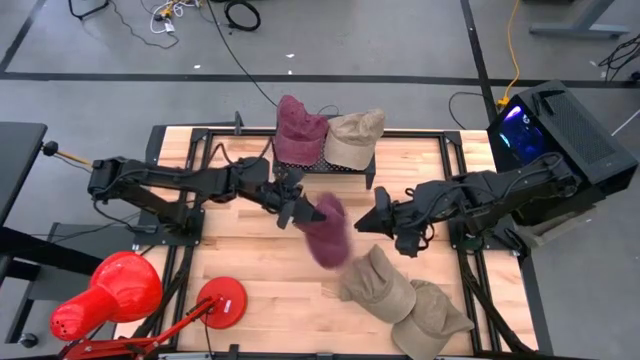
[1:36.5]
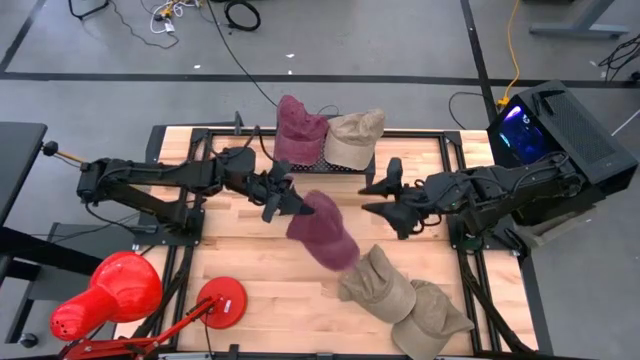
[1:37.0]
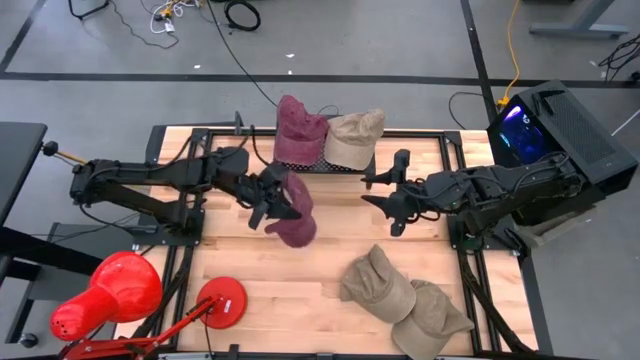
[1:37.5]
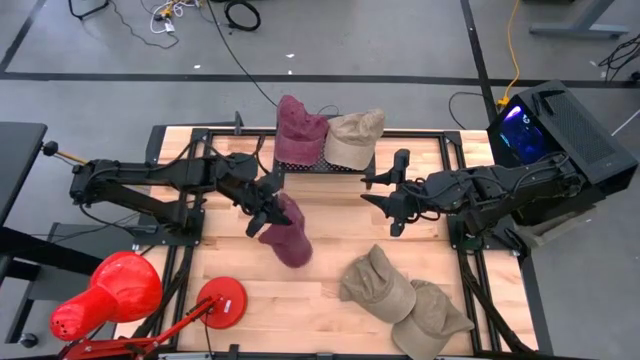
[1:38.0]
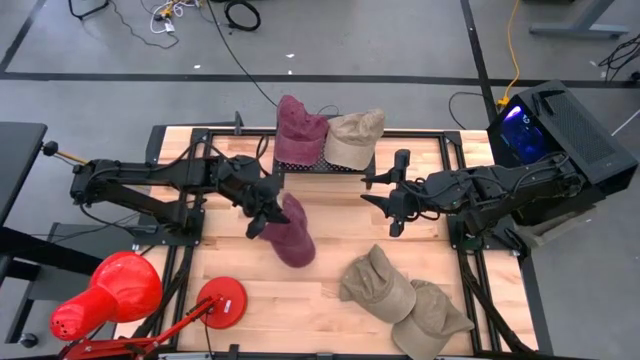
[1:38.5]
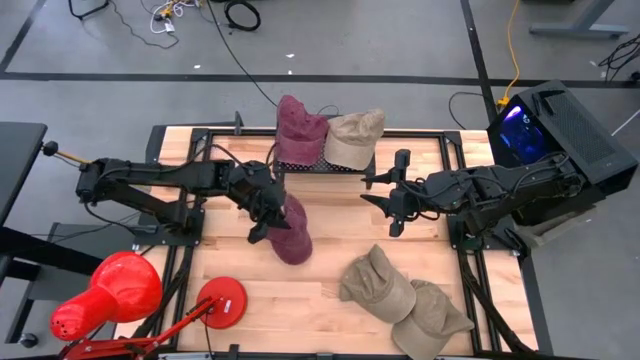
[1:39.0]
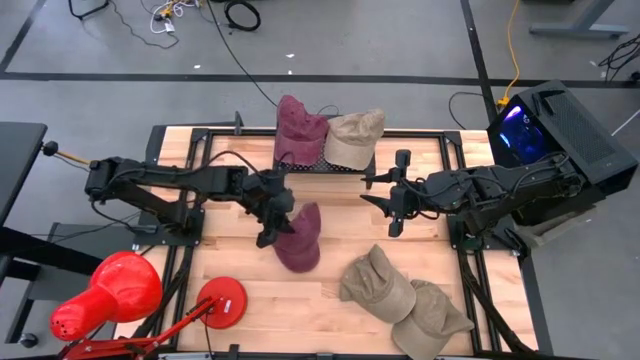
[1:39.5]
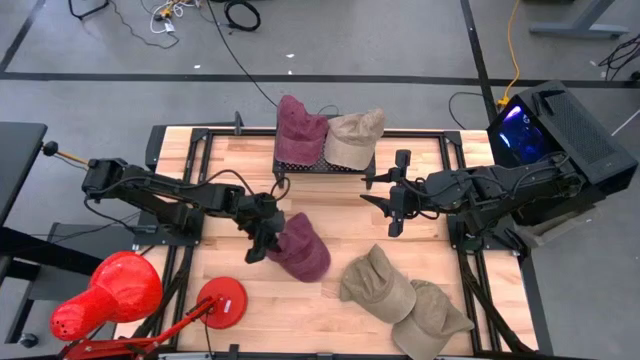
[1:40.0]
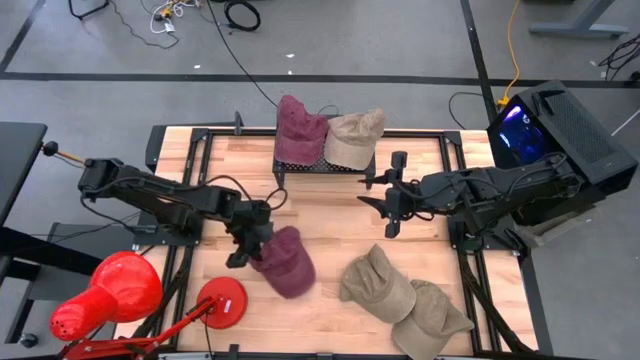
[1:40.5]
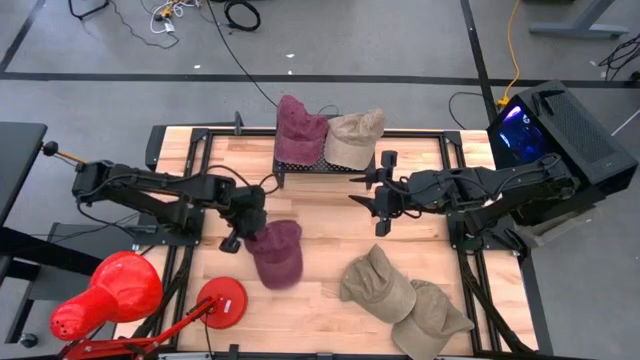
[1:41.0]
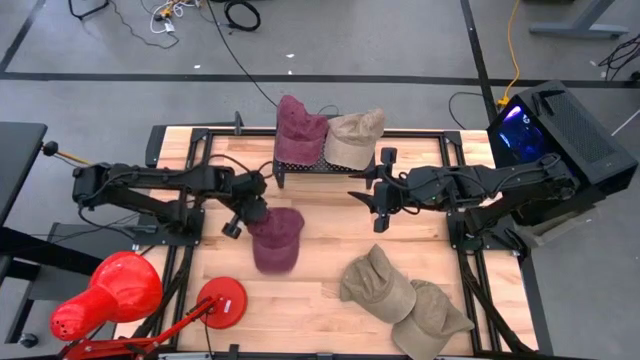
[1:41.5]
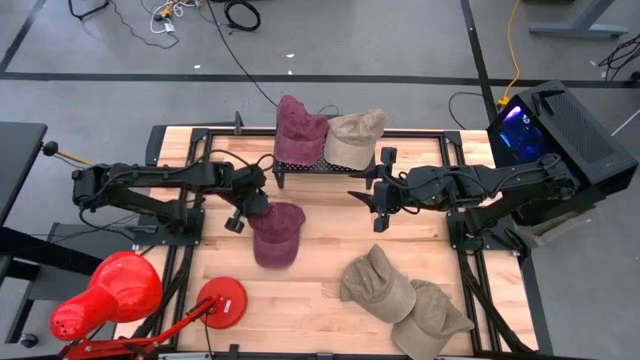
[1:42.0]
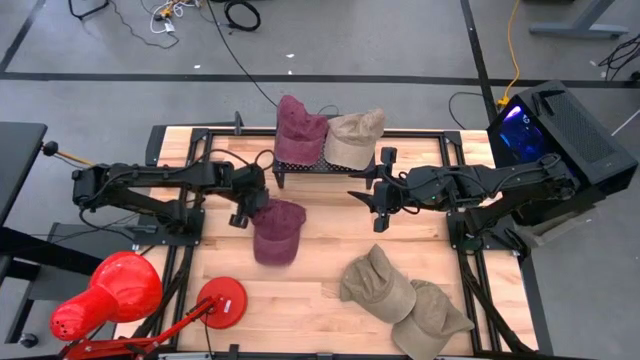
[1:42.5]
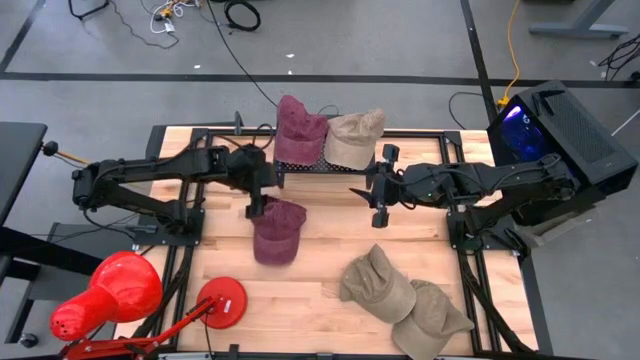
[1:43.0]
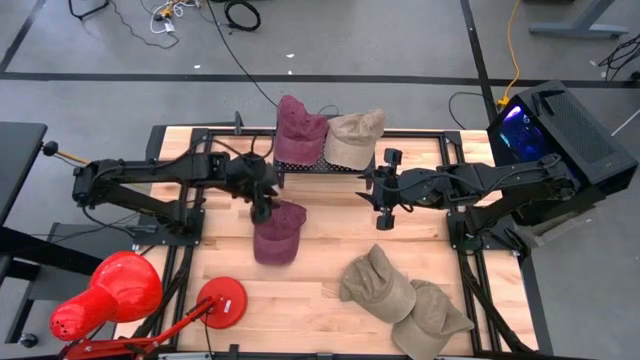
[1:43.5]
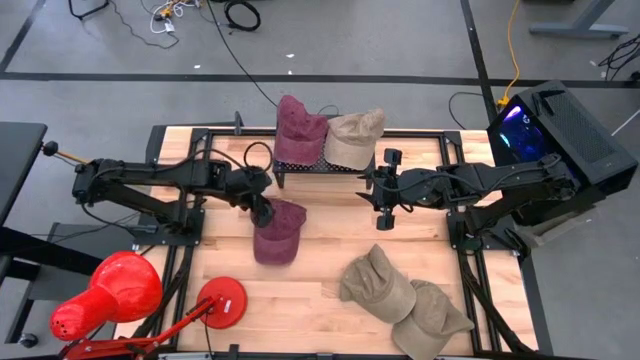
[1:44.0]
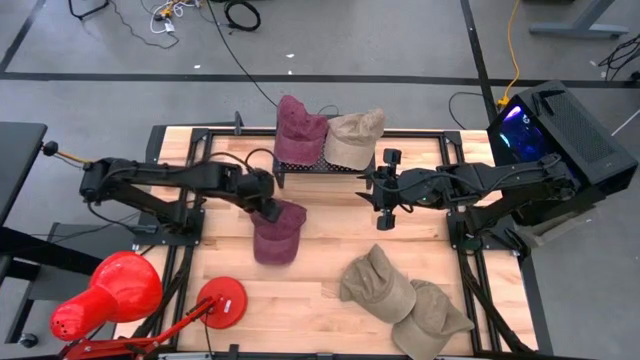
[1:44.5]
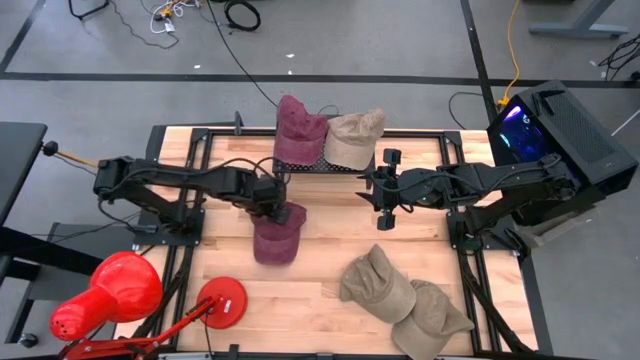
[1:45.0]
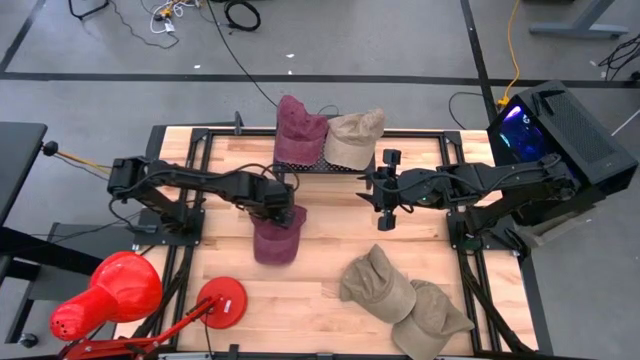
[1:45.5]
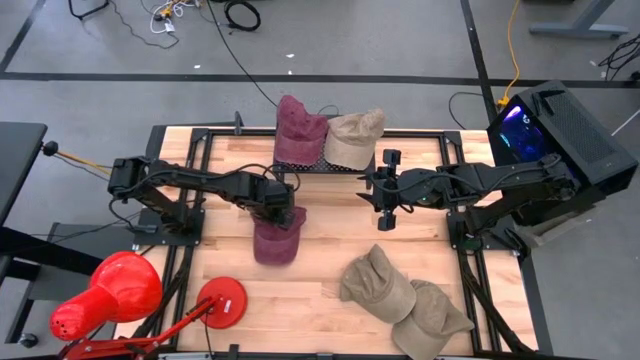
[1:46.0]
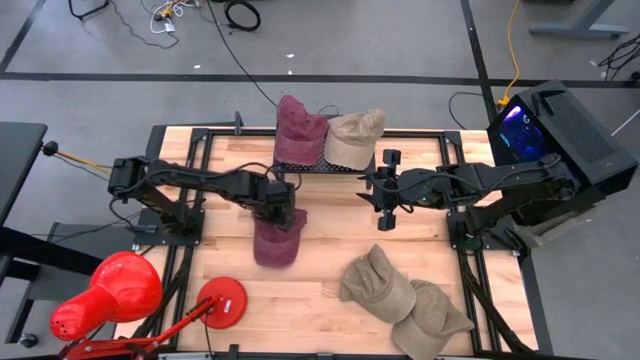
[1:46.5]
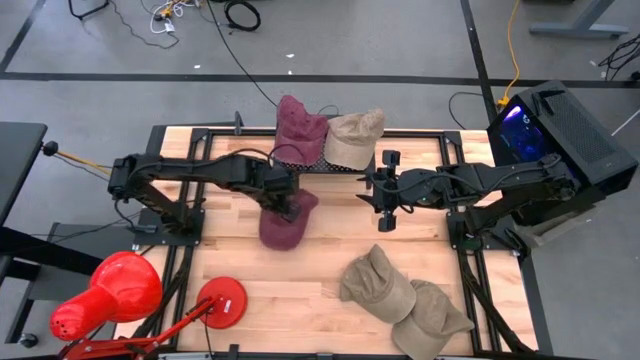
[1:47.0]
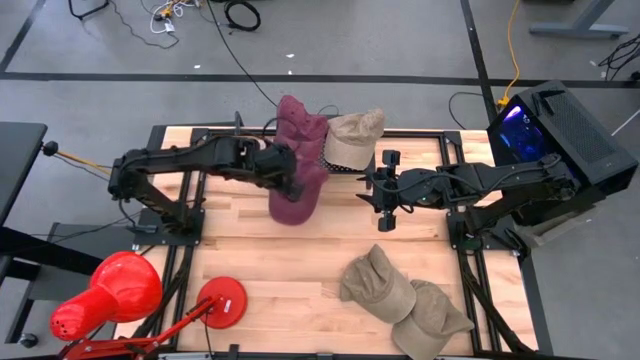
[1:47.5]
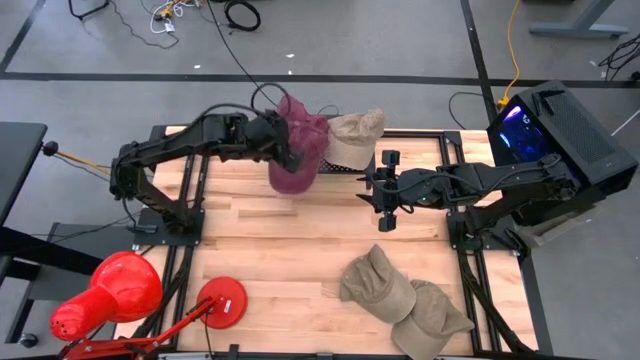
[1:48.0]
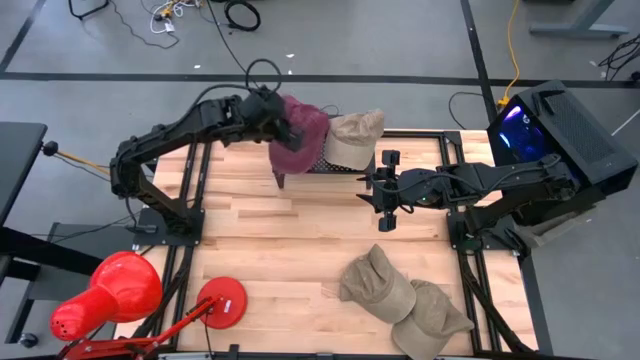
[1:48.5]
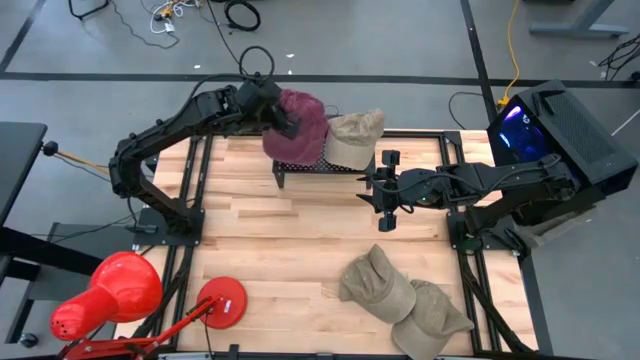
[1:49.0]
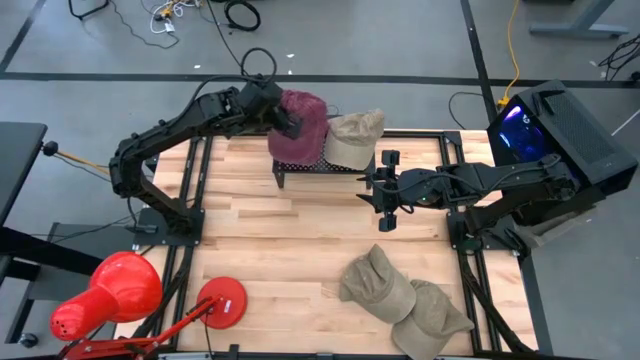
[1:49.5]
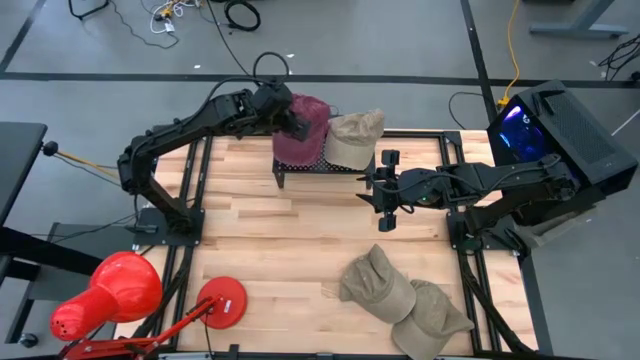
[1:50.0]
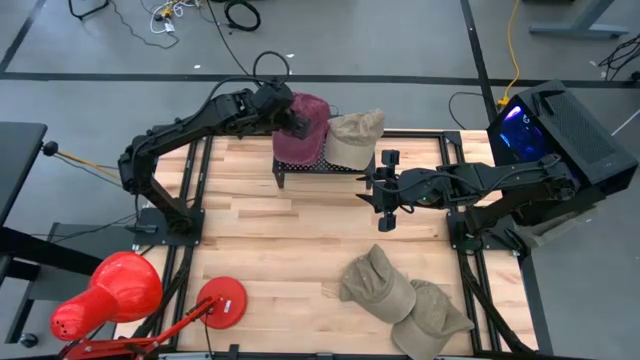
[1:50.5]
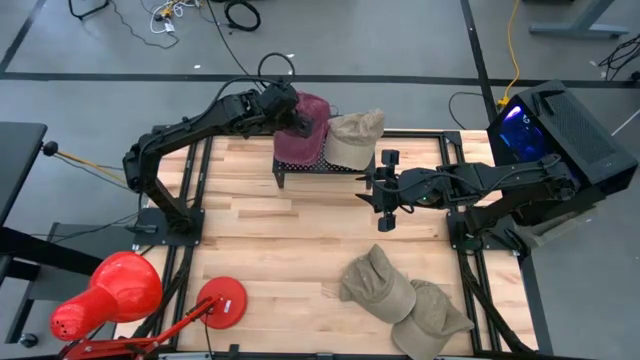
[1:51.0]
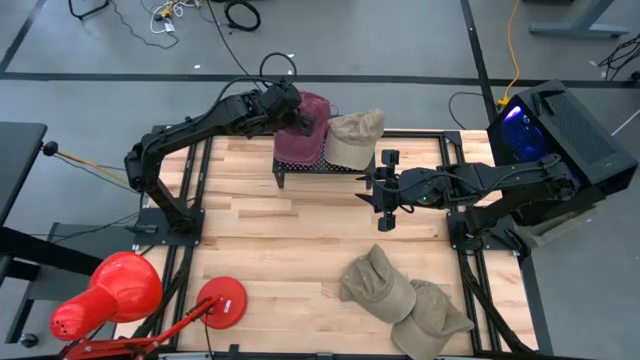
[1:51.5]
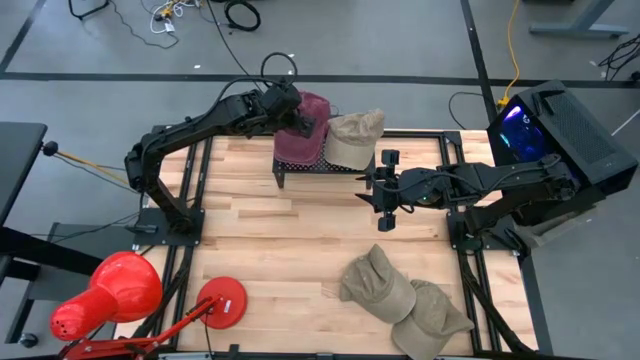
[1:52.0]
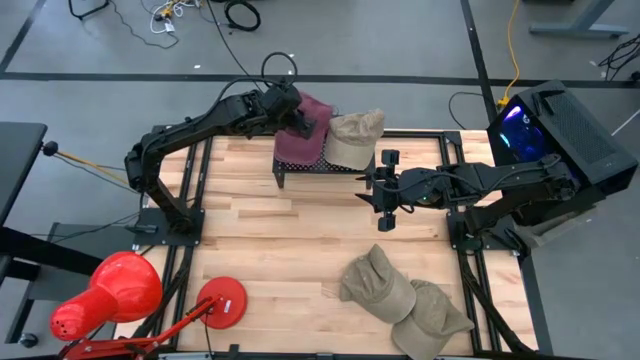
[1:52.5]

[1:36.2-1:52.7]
Task: Pick & Place hat
Stack the red cap on top of the red cap on the shelf

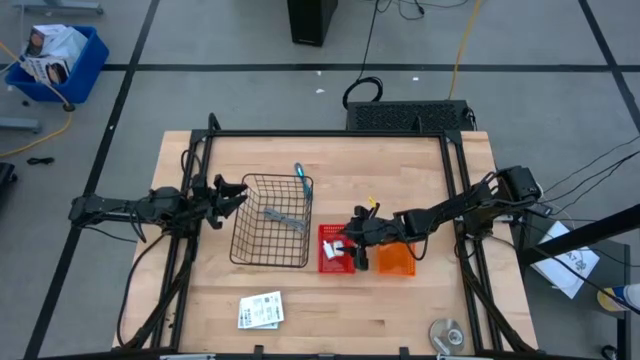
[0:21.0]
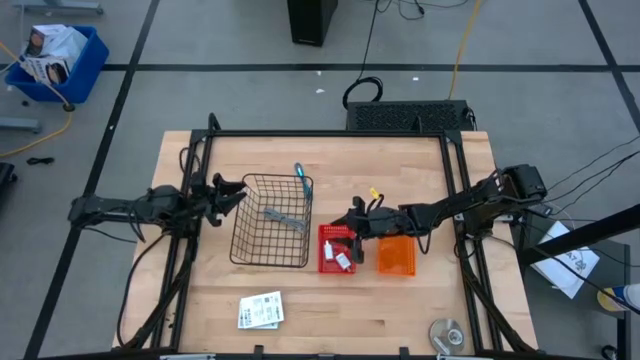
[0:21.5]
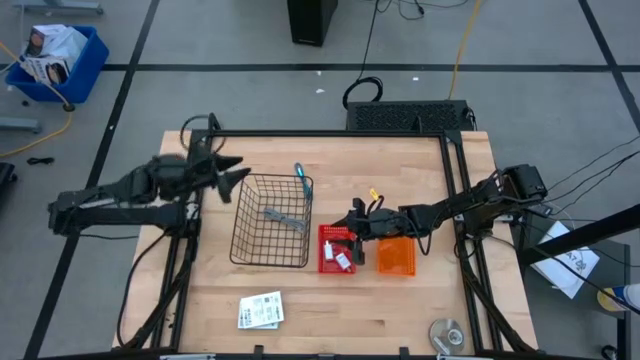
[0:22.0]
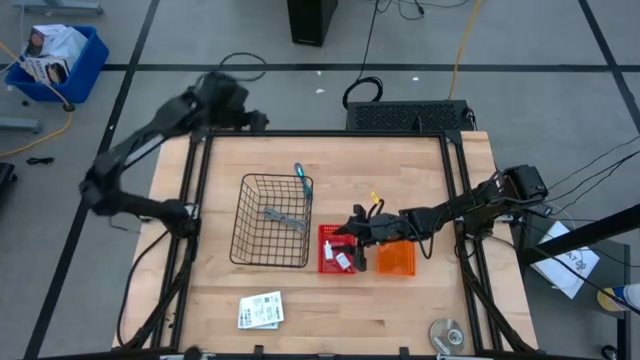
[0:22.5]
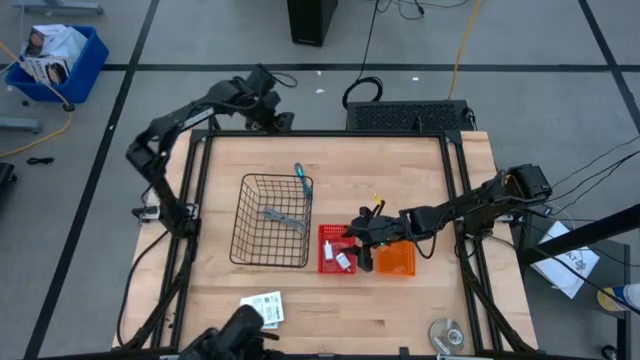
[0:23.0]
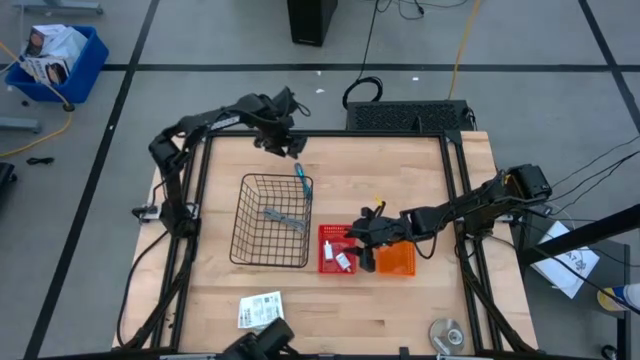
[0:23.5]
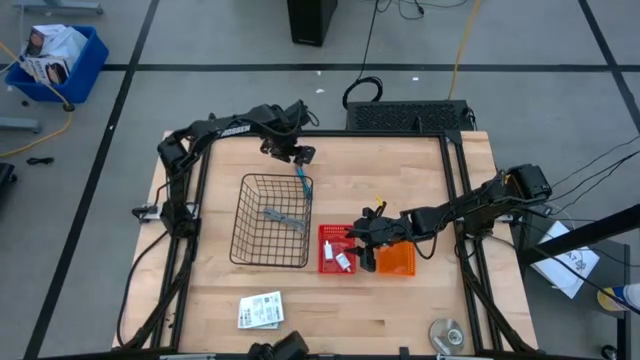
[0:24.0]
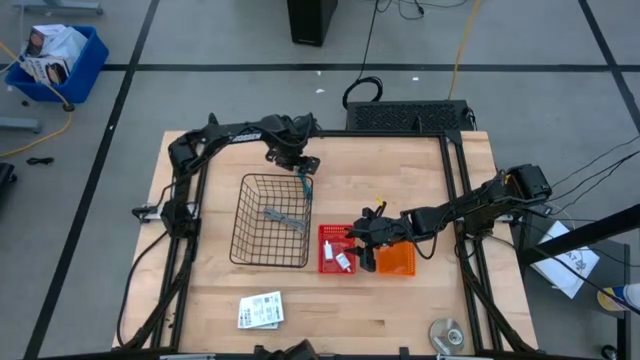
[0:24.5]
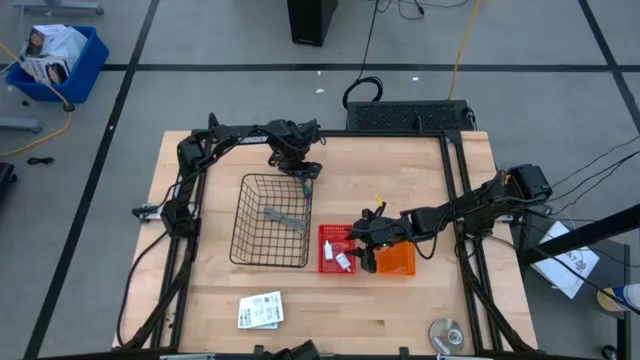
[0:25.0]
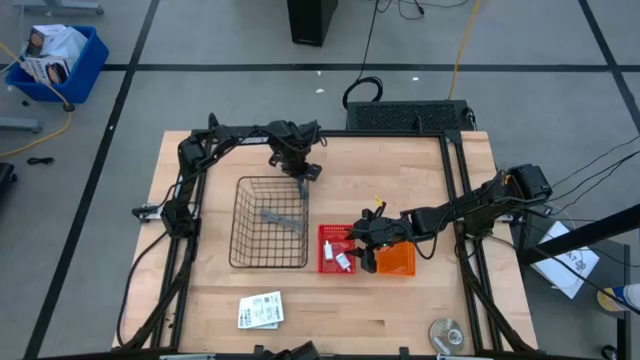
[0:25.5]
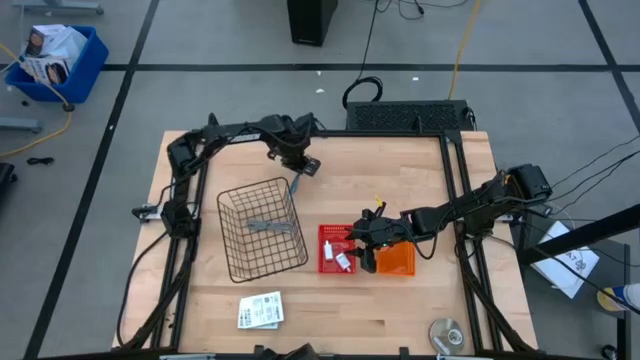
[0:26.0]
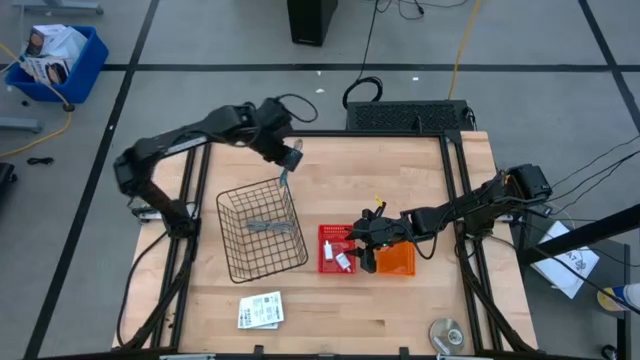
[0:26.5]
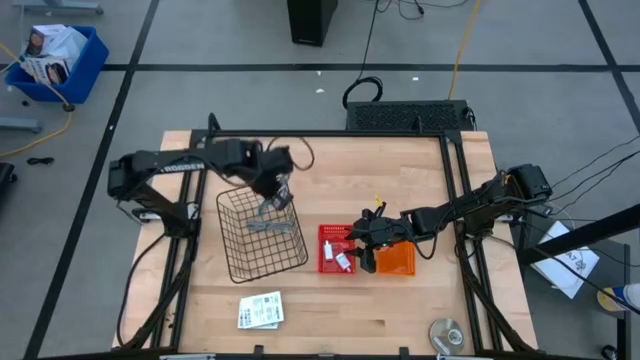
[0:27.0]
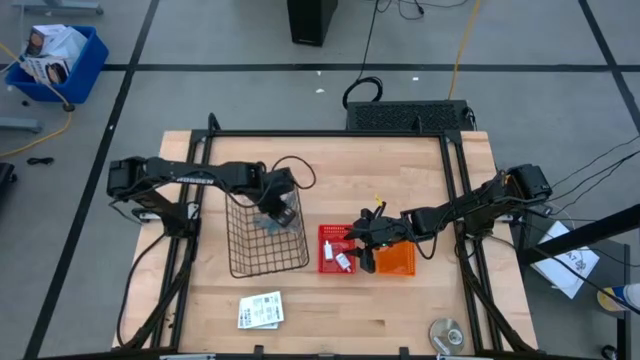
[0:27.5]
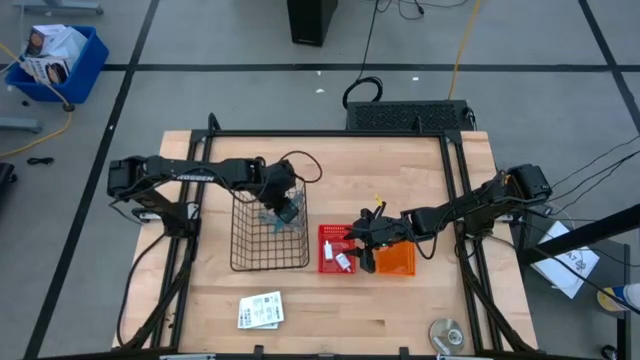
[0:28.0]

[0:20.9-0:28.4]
Task: Pick and place items into bin
Put the blue USB cable into the black basket
